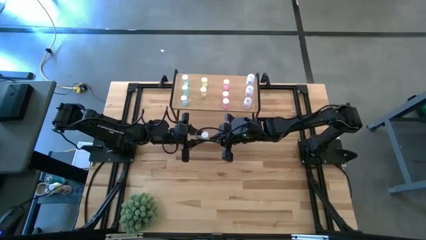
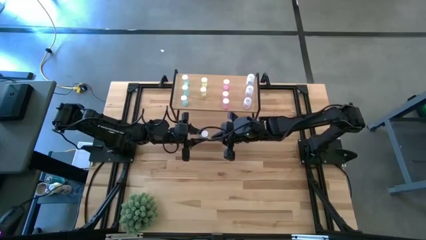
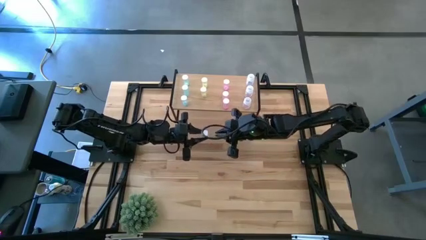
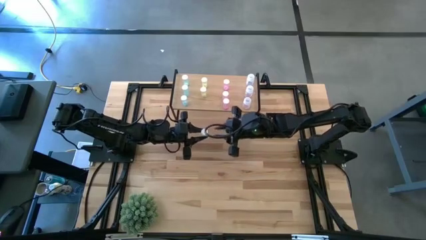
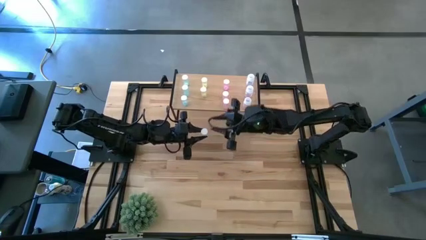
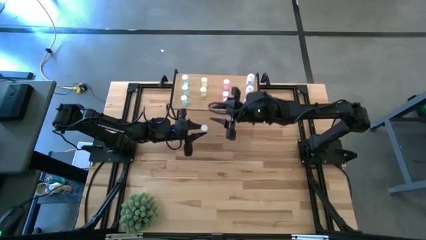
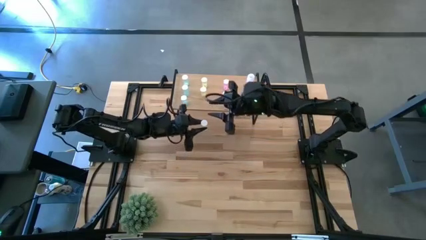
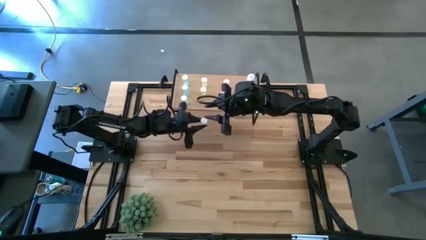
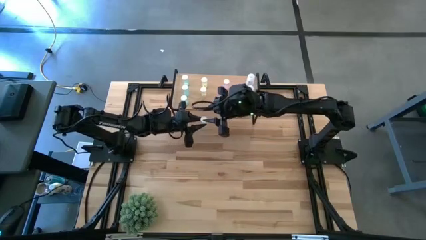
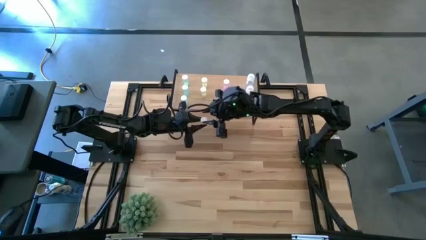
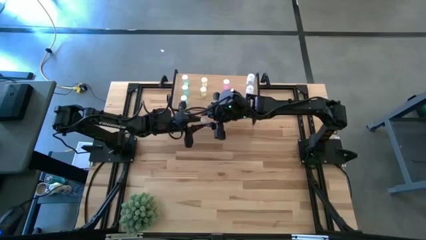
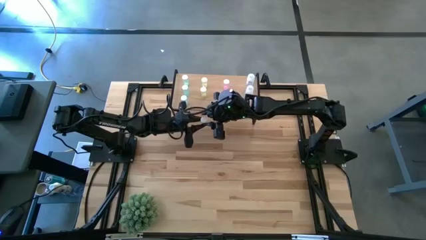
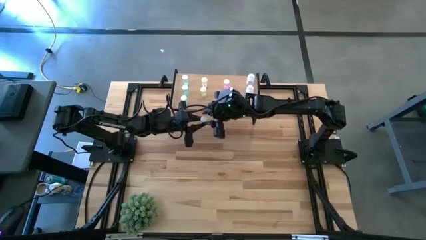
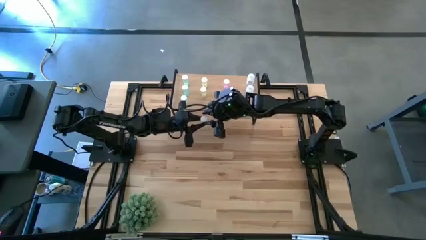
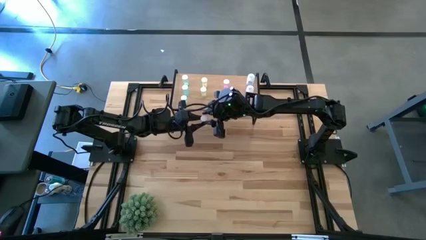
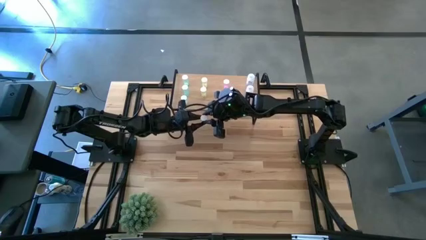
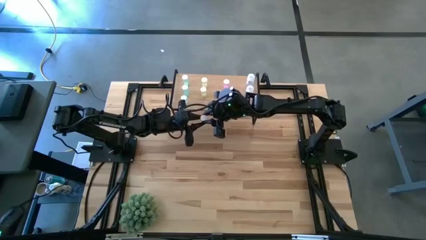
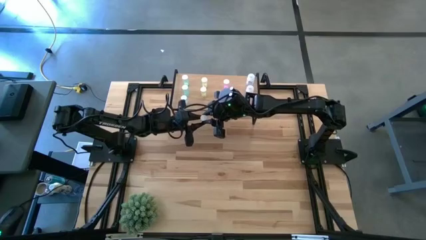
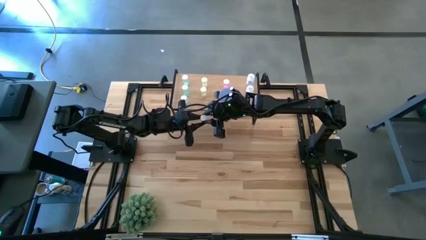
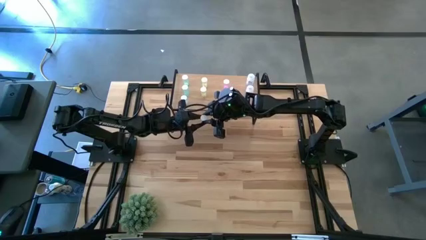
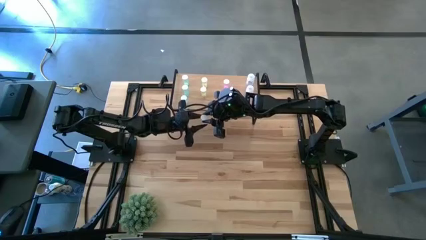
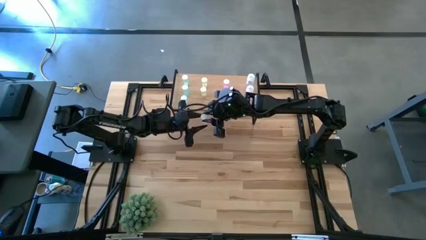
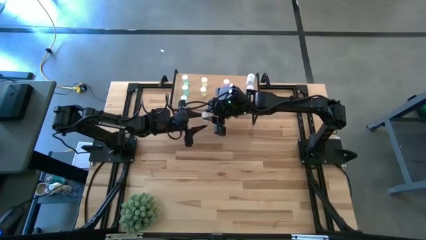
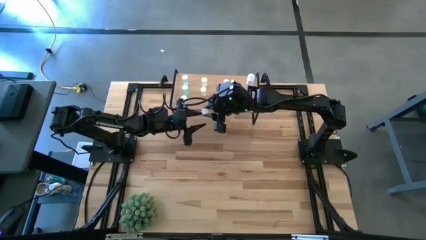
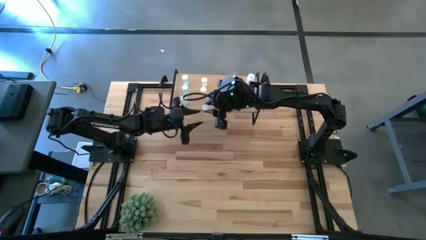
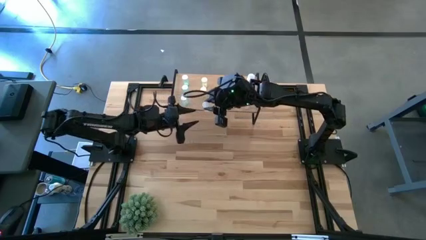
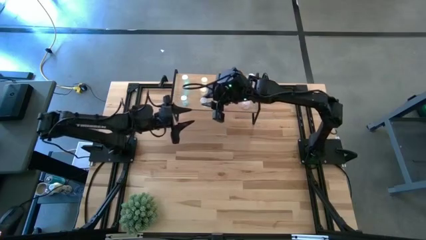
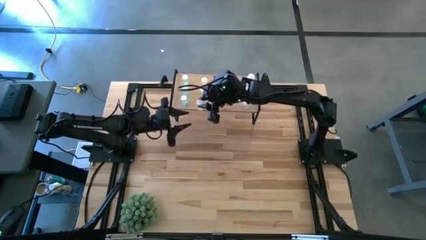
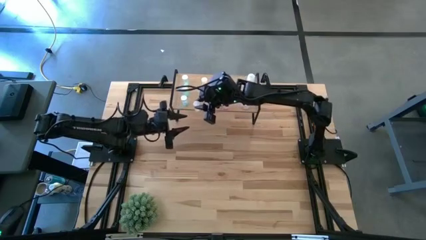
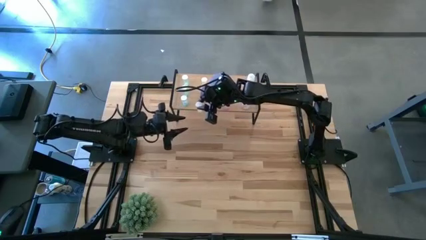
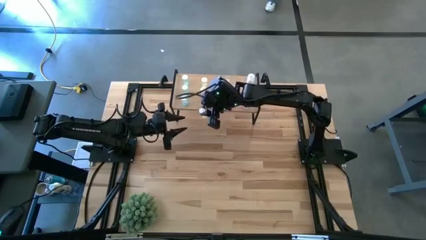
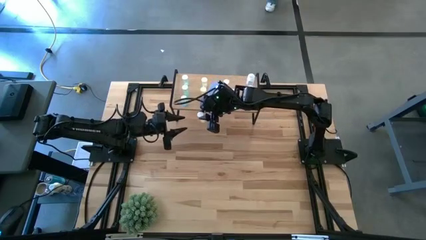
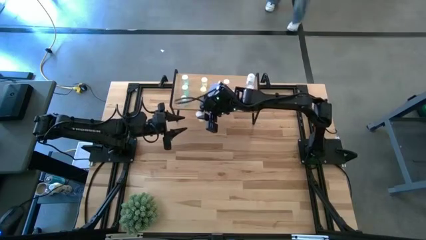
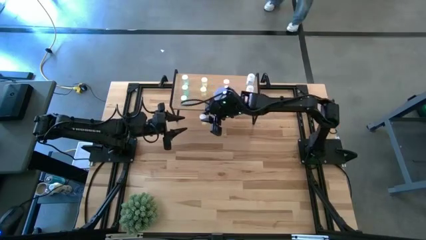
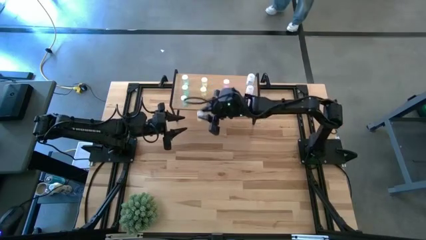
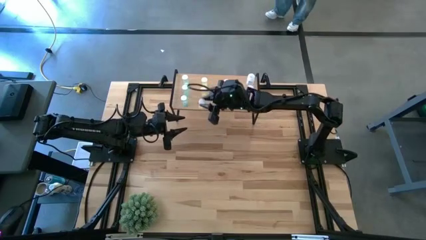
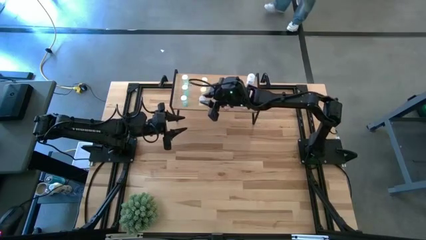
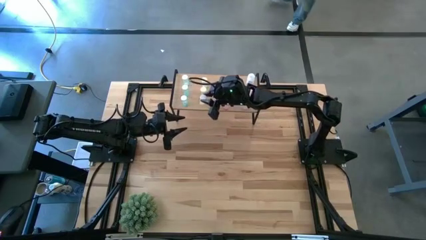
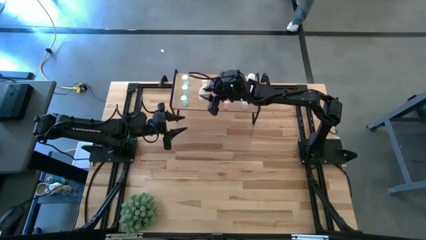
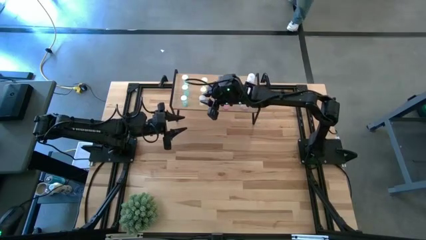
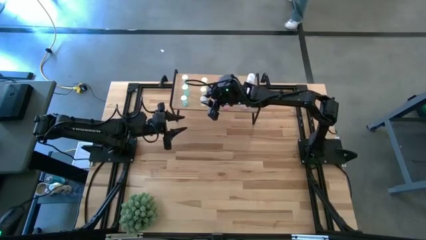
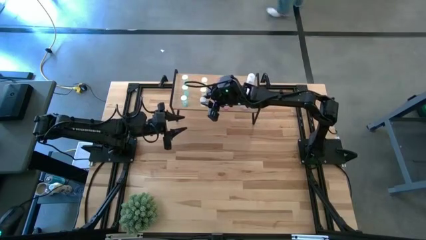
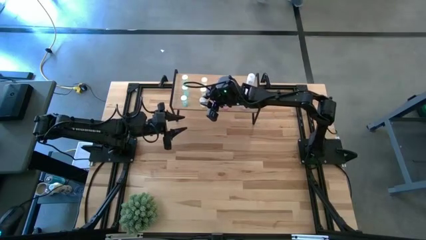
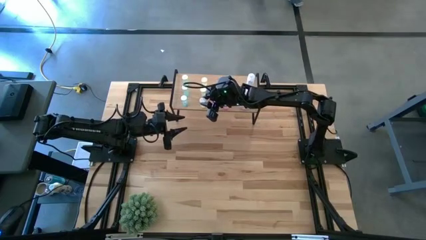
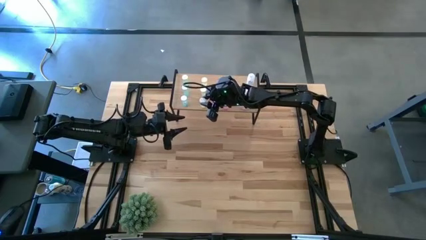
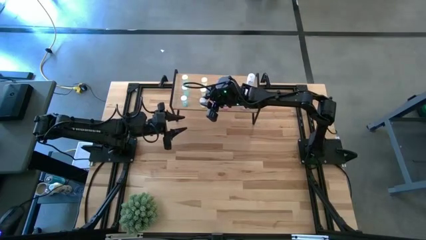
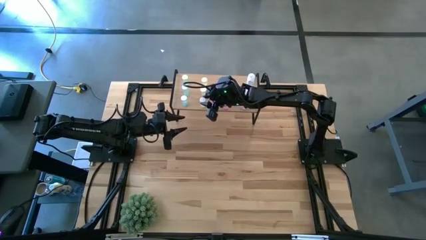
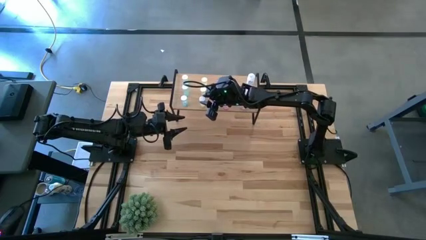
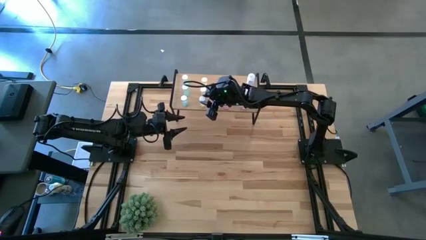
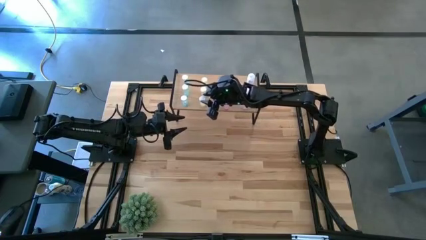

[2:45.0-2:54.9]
Task: Pick and place medicine bottles onto shelf by color
Put the yellow pill bottle into the shelf aligned with the other yellow pill bottles

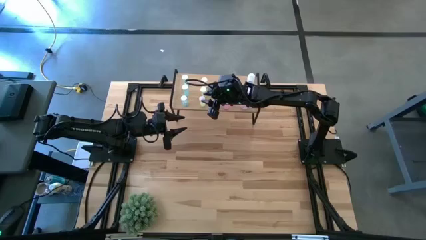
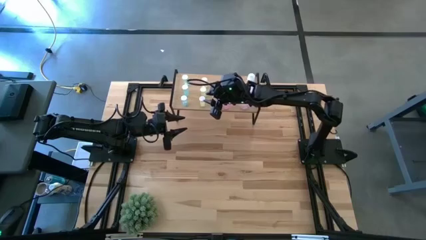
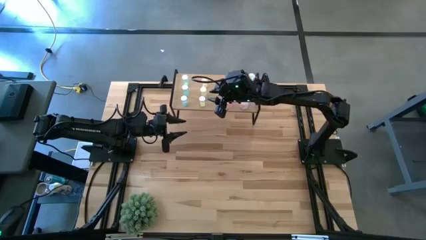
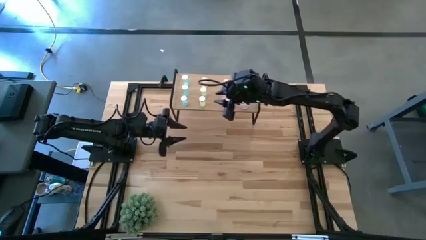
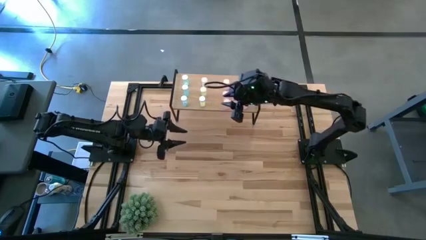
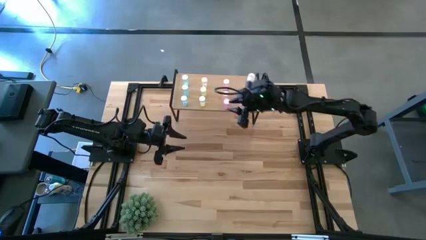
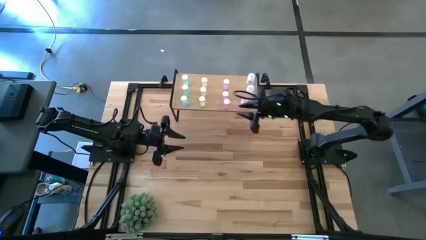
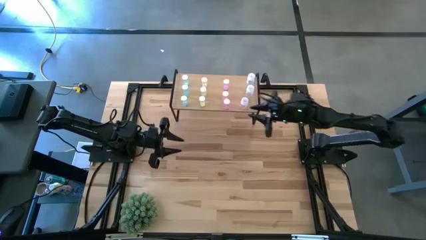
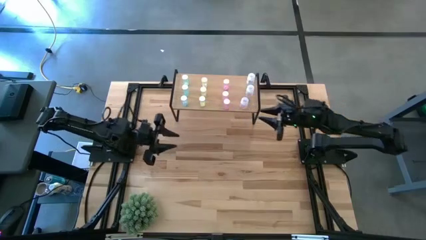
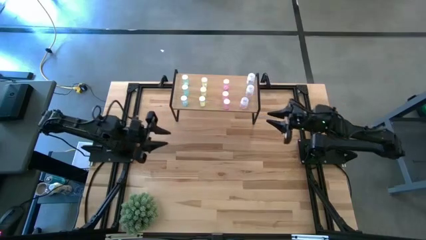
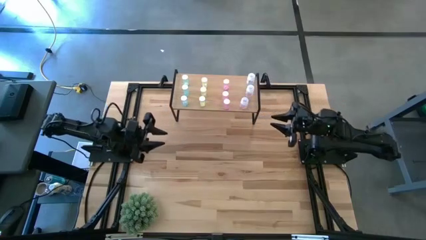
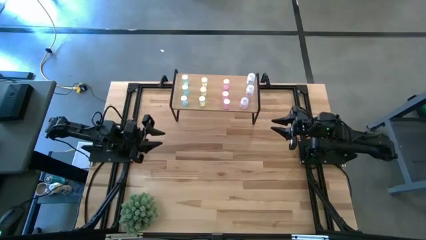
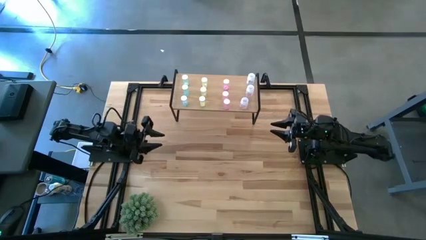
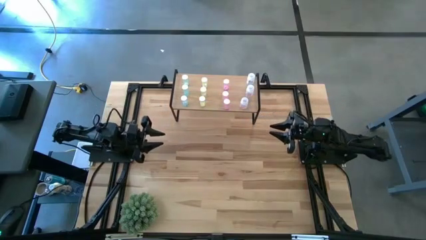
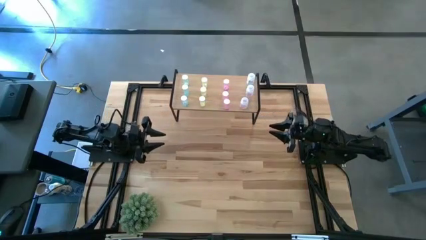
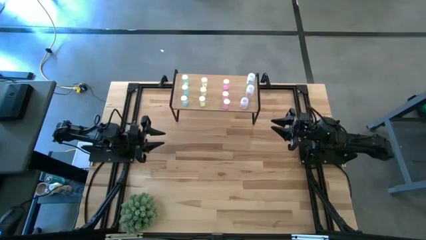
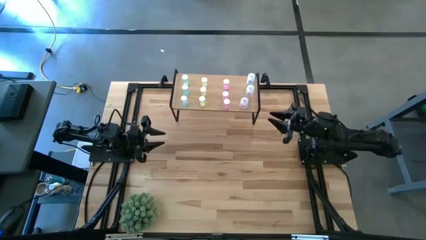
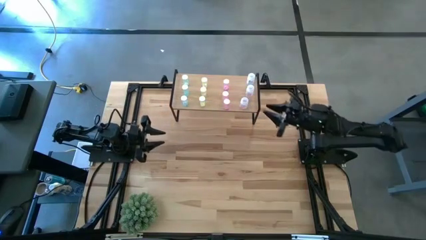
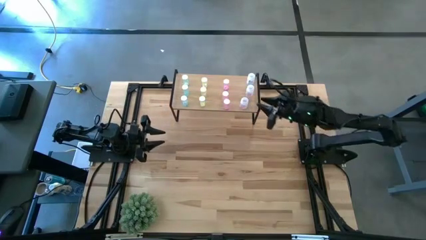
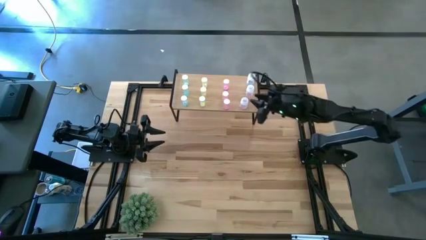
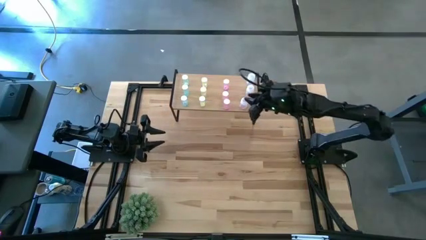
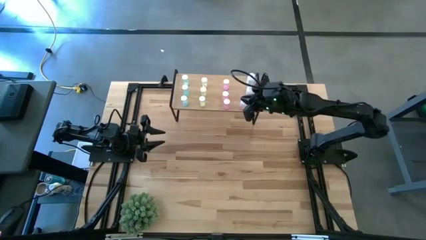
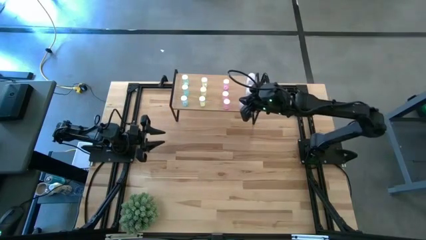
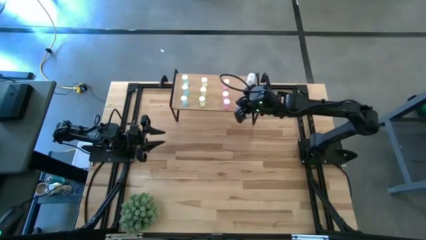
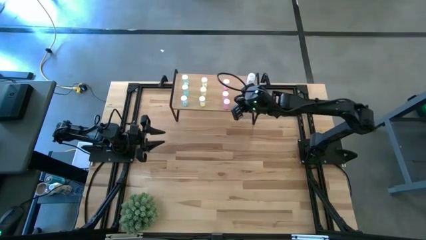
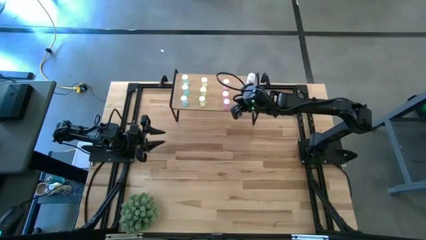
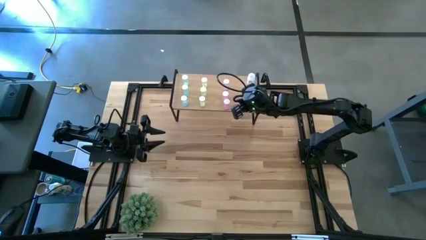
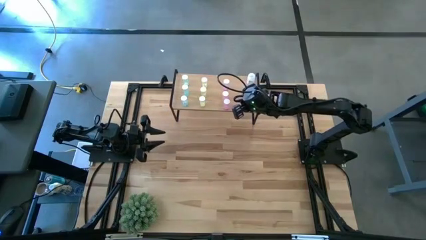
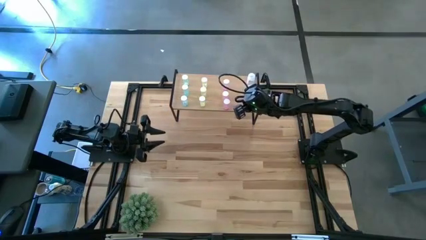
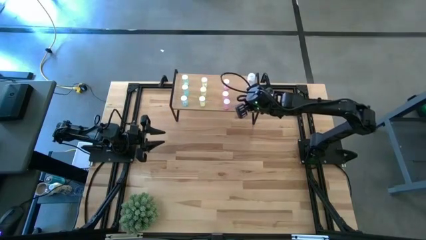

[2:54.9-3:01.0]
Adjust the white pill bottle on the shelf
